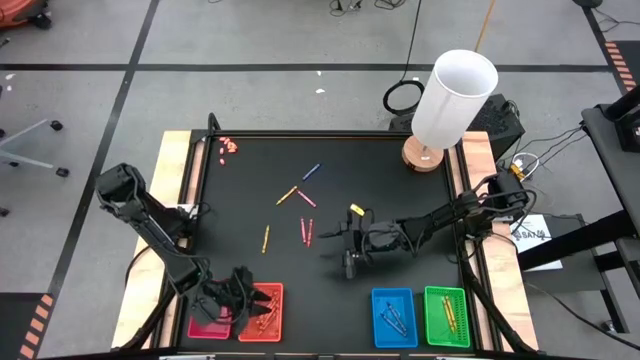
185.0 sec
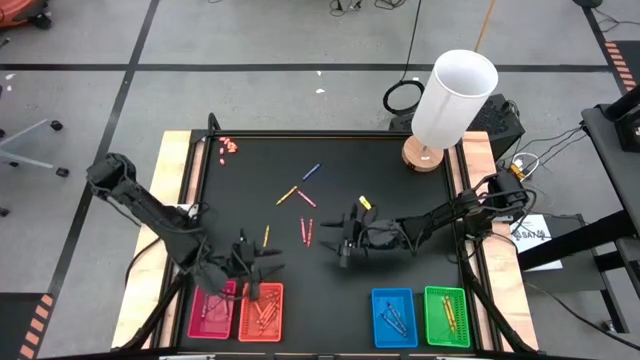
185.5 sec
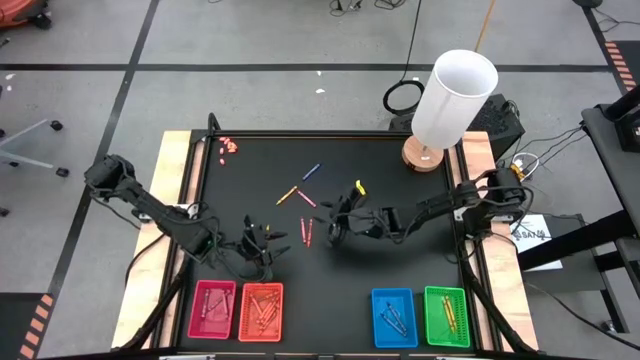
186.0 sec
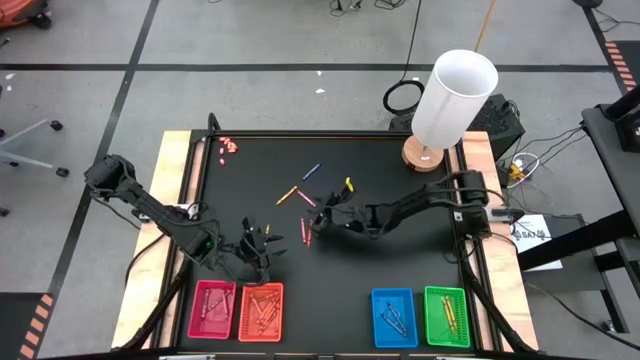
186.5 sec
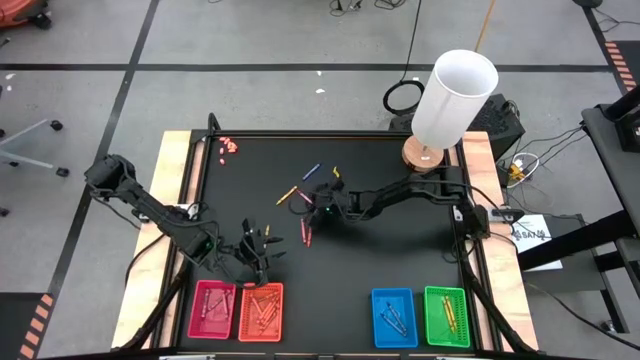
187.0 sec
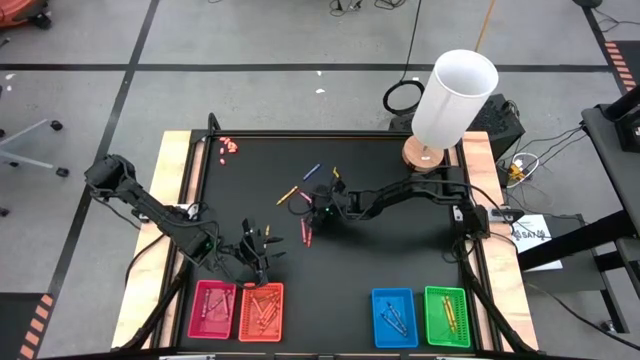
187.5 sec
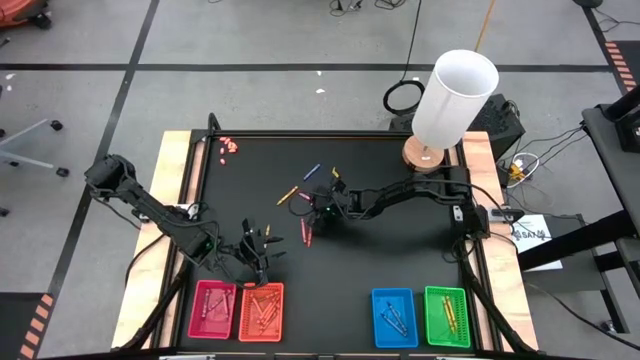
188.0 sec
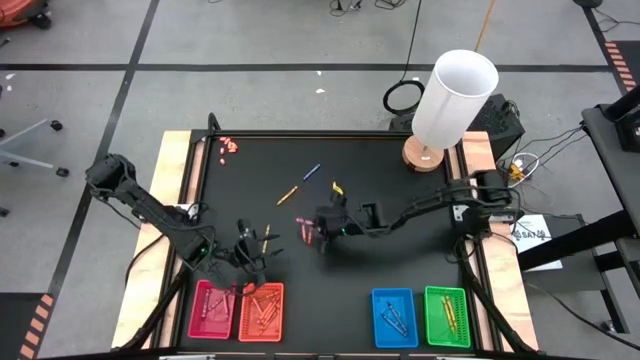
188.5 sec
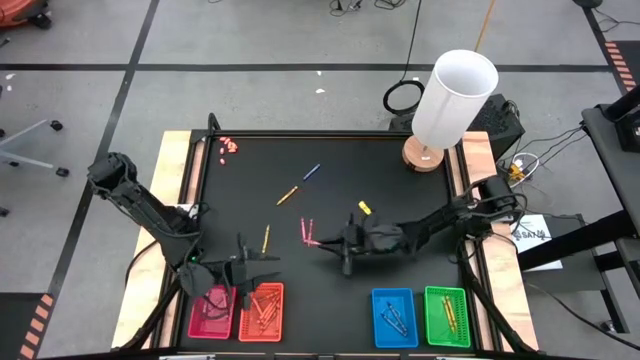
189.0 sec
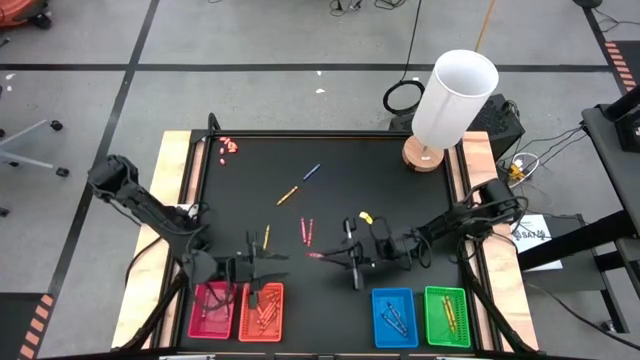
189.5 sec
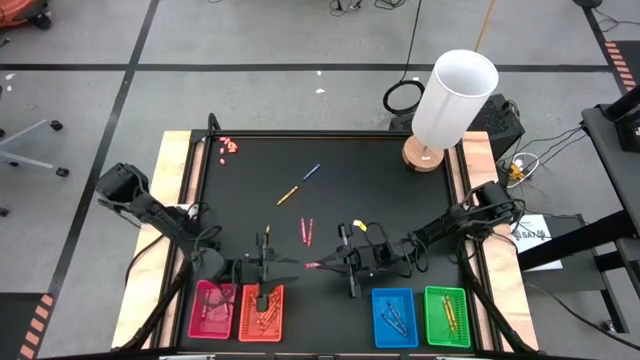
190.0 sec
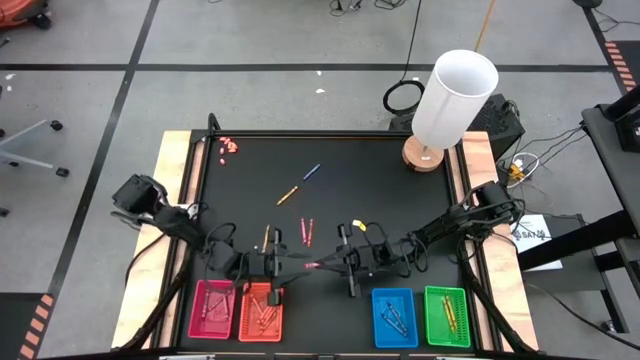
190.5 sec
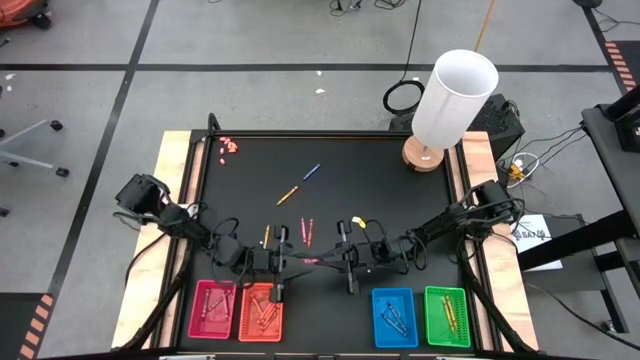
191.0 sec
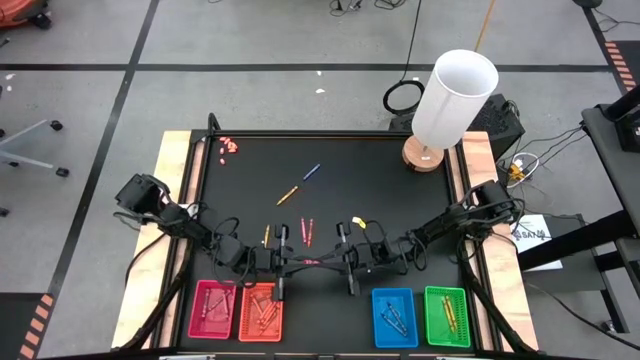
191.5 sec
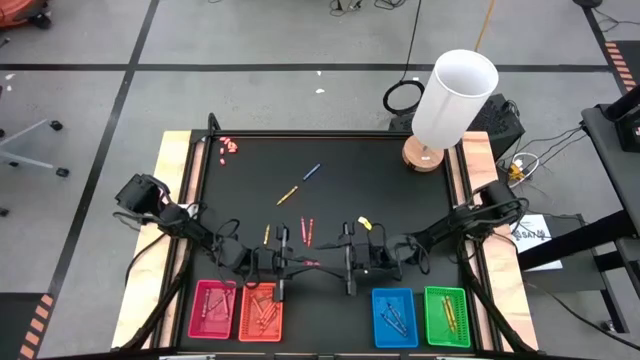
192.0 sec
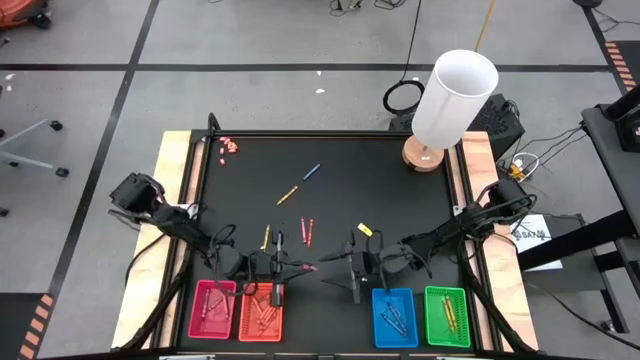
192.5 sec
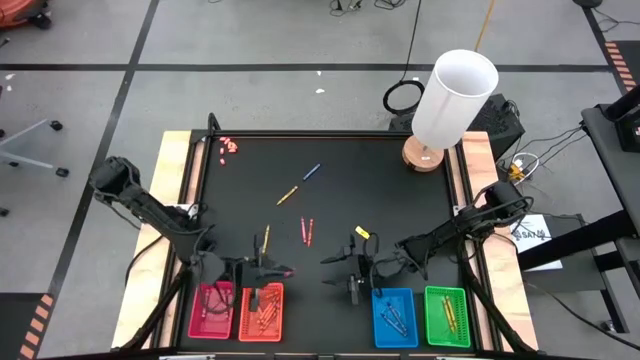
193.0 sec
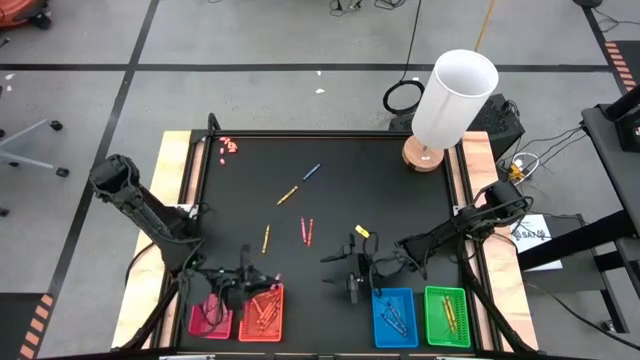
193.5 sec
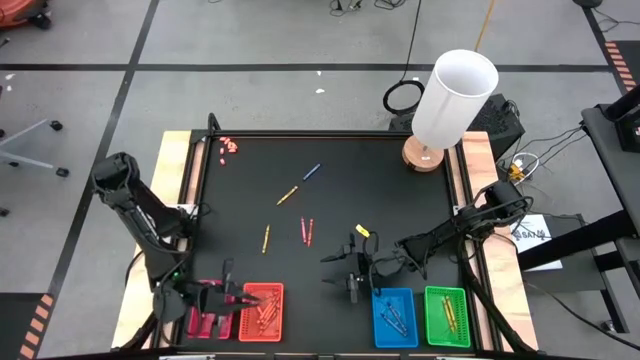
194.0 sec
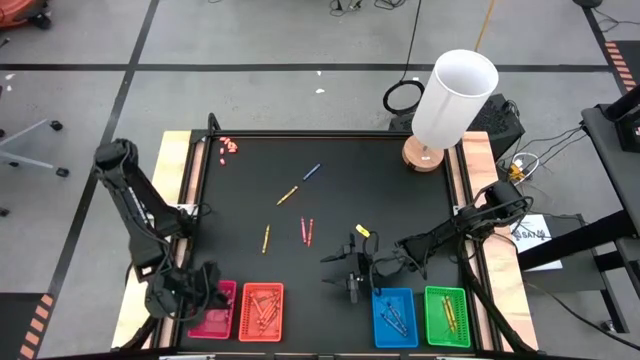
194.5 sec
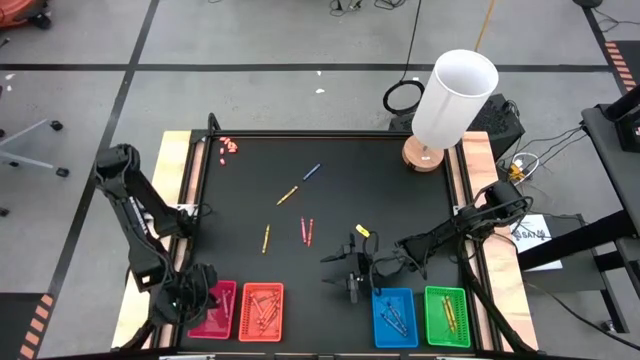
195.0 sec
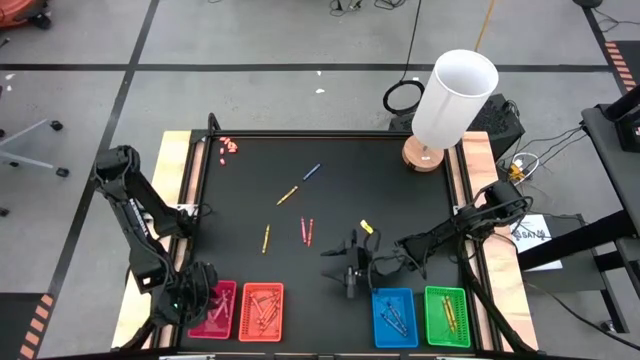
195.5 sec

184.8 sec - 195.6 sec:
Task: Sort crayons
Put the red crayon into the red bin

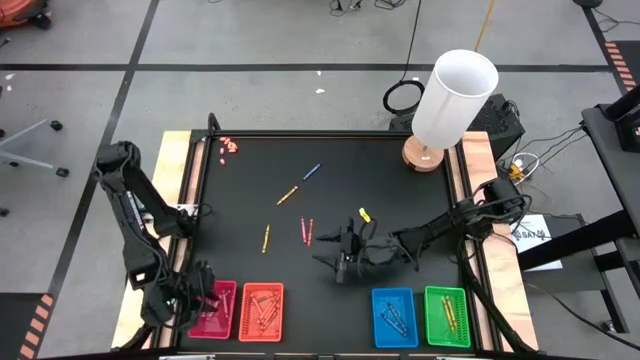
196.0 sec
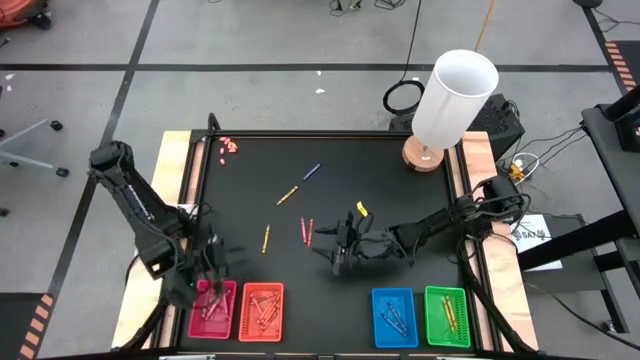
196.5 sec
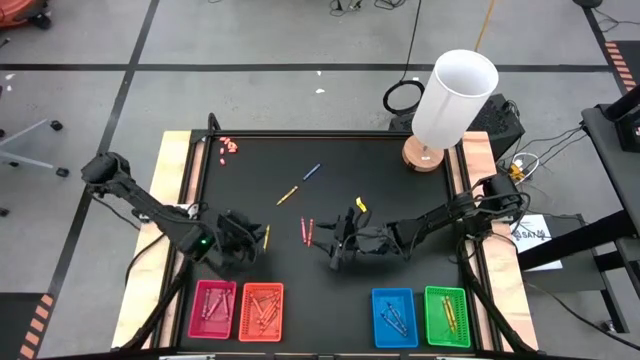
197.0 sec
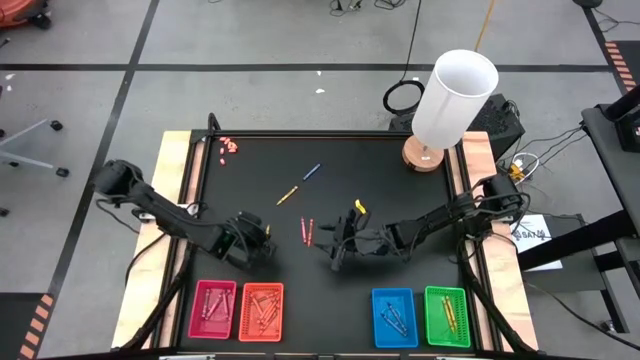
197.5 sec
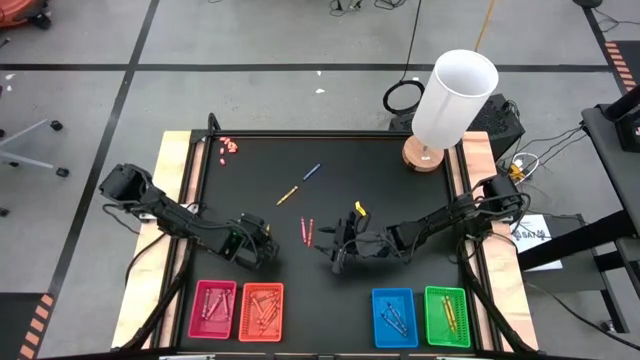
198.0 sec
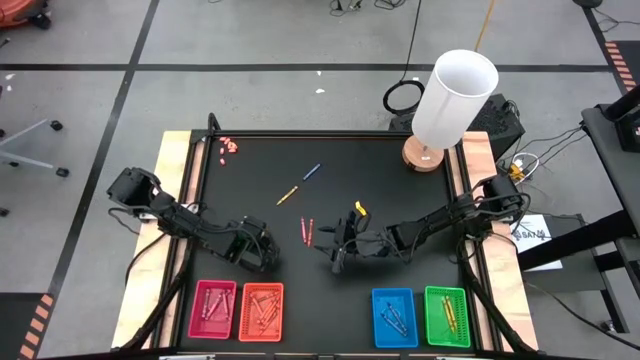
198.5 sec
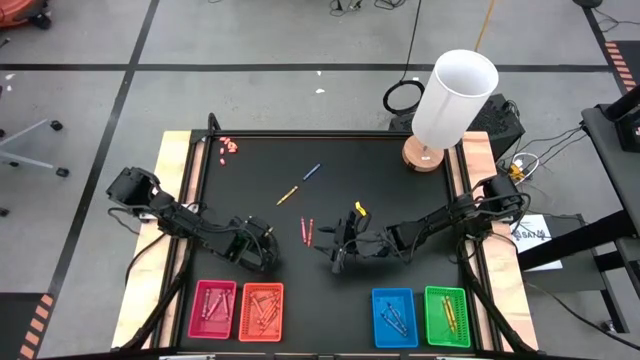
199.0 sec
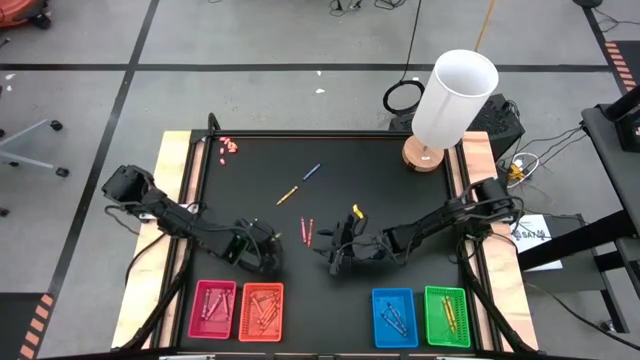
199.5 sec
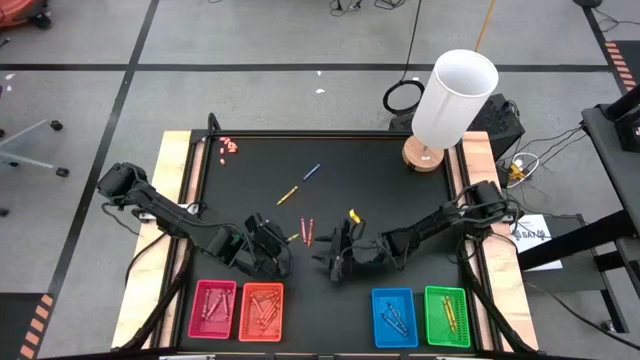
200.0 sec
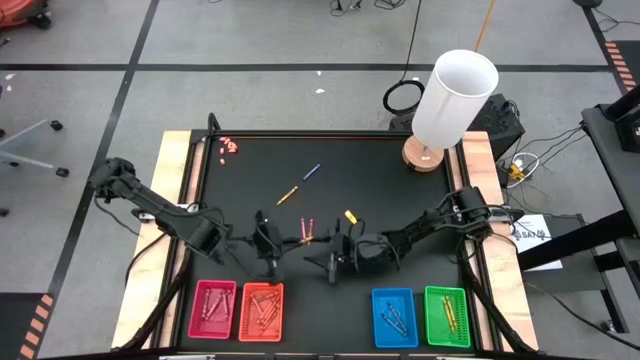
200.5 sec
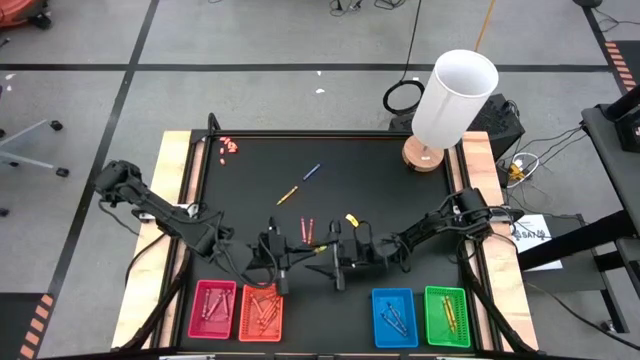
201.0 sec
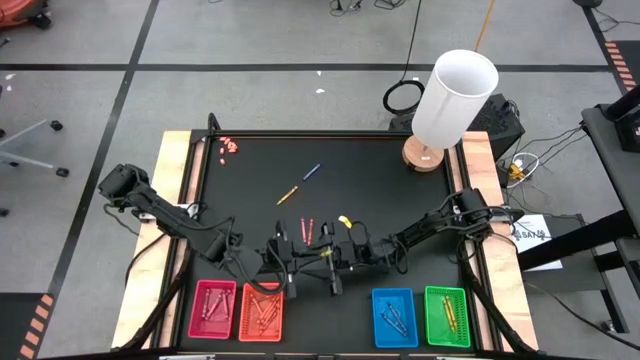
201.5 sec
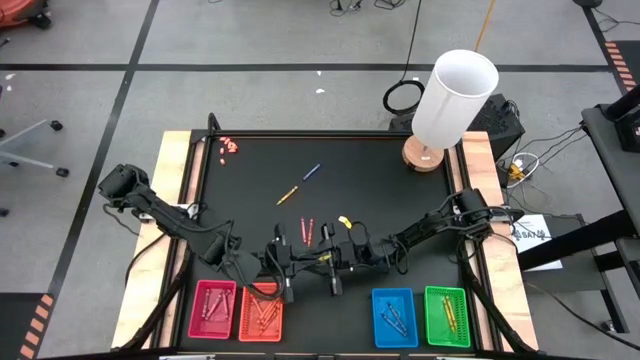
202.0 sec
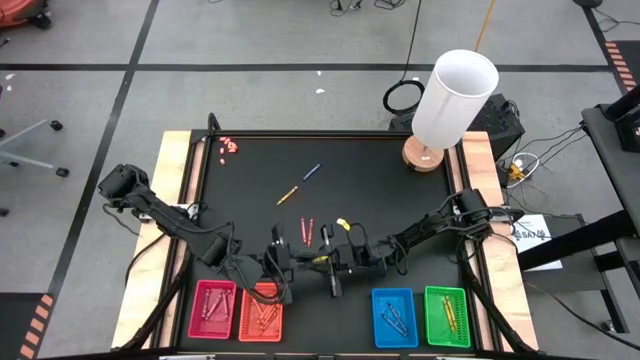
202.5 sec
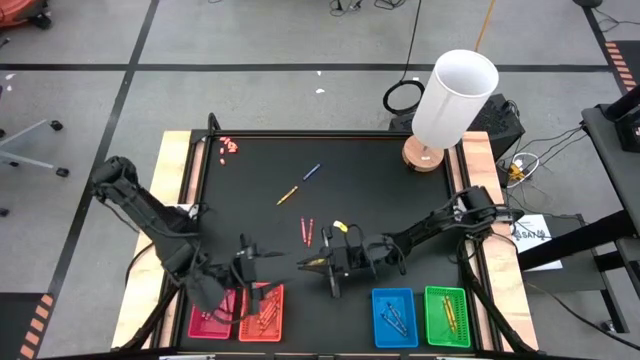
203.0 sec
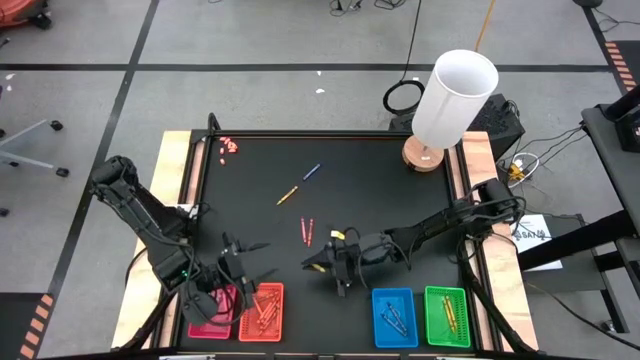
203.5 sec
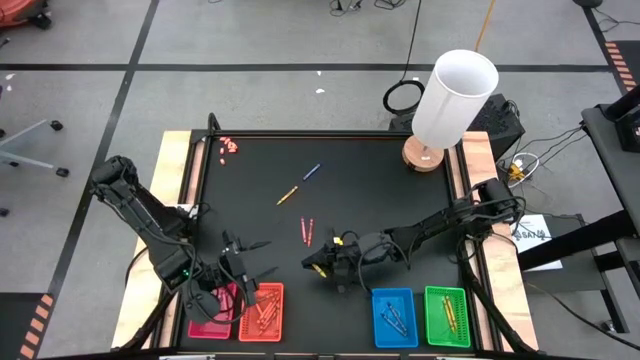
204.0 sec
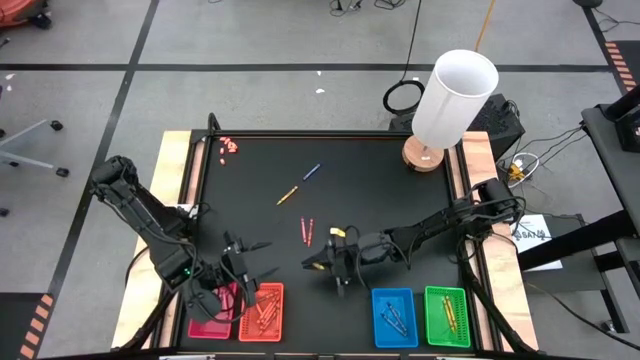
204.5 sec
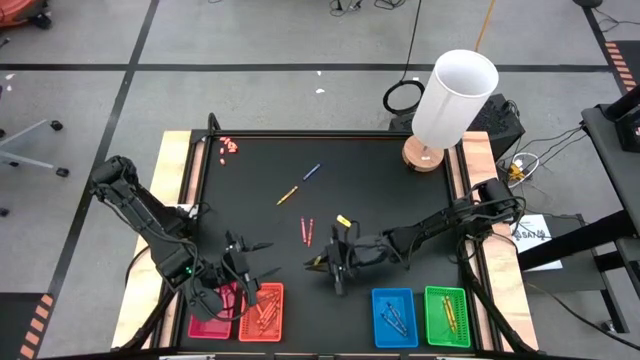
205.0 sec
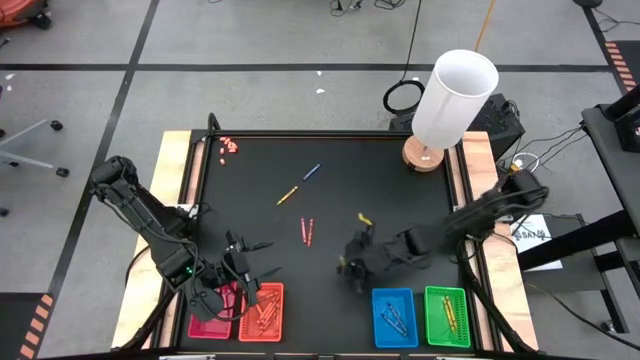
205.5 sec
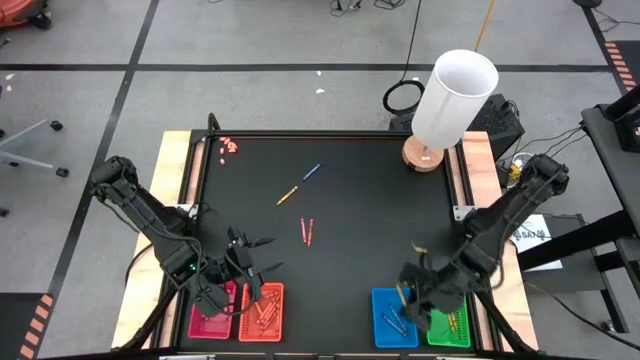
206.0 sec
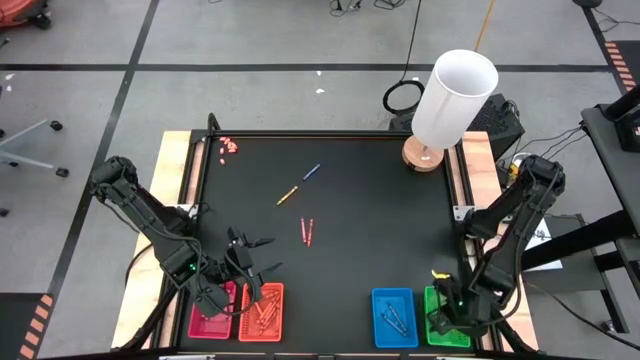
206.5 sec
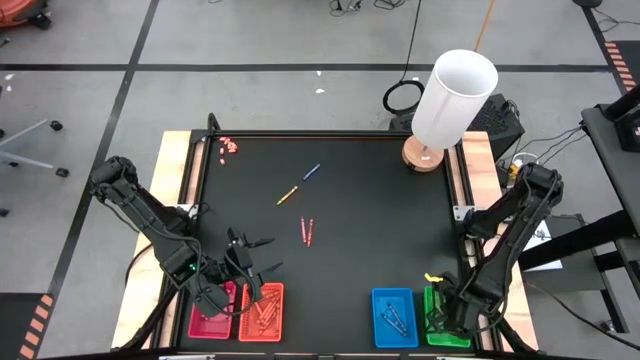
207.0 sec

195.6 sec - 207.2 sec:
Put the green crayon into the green bin
